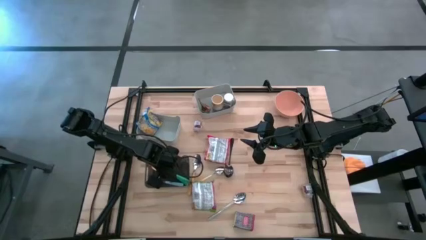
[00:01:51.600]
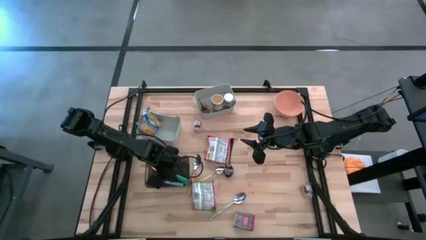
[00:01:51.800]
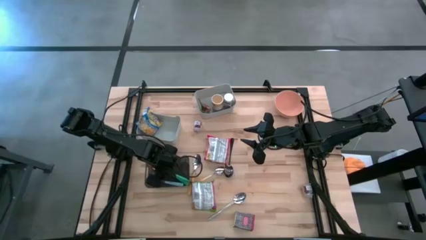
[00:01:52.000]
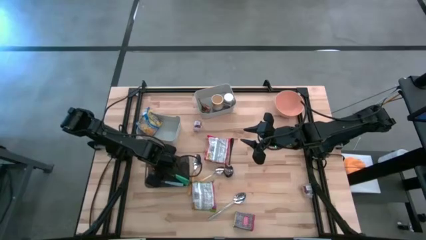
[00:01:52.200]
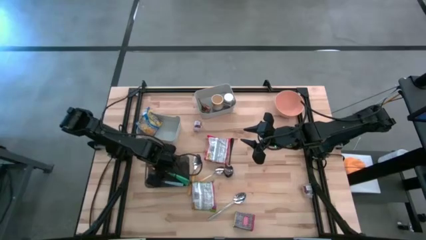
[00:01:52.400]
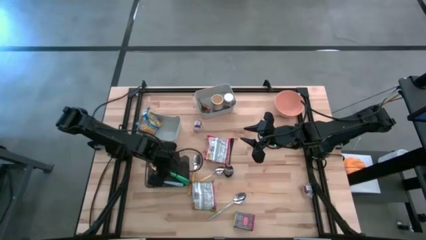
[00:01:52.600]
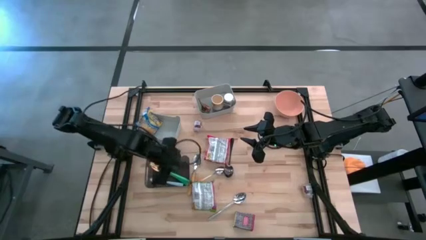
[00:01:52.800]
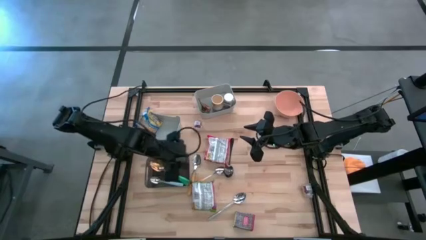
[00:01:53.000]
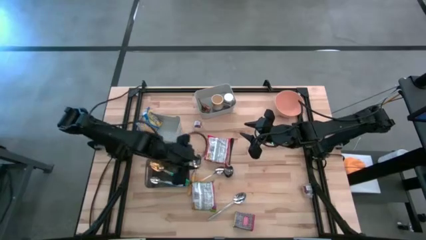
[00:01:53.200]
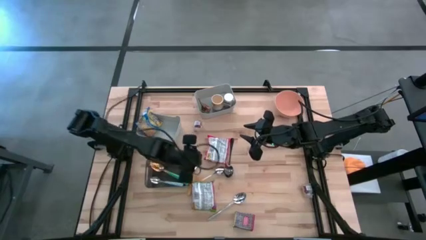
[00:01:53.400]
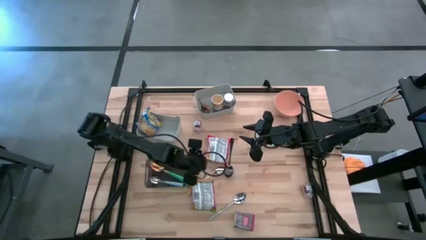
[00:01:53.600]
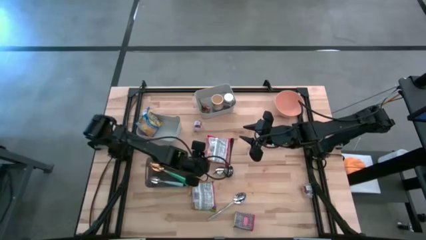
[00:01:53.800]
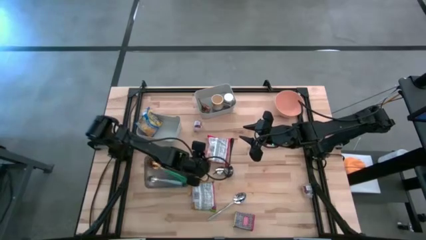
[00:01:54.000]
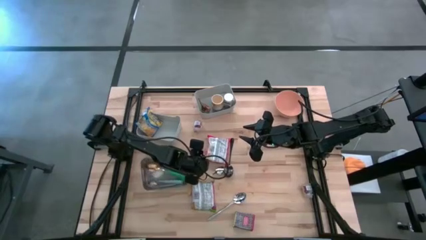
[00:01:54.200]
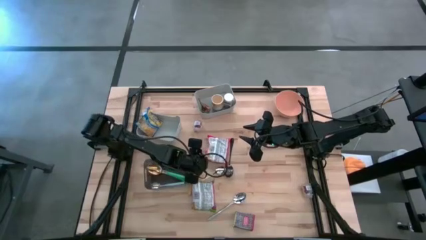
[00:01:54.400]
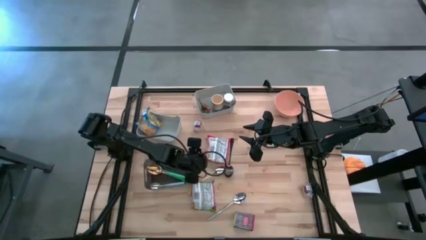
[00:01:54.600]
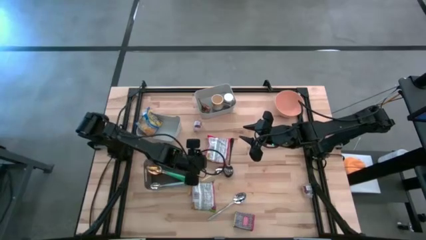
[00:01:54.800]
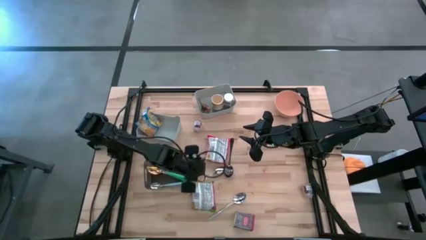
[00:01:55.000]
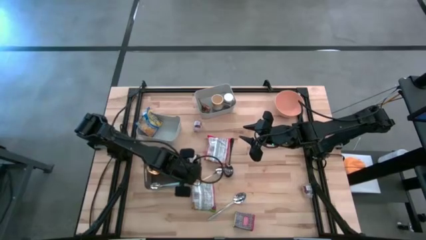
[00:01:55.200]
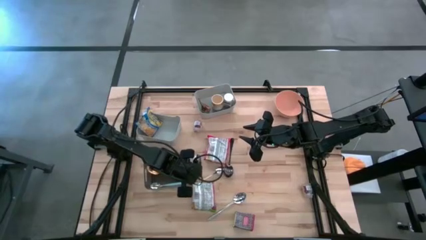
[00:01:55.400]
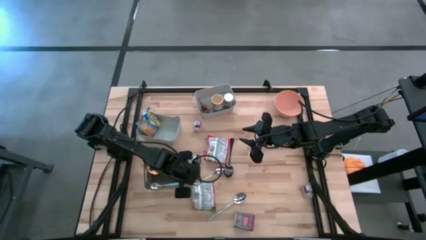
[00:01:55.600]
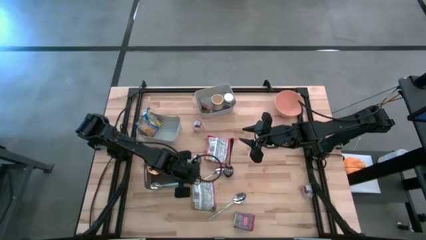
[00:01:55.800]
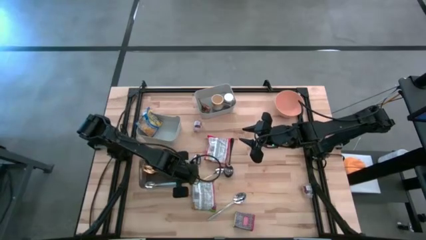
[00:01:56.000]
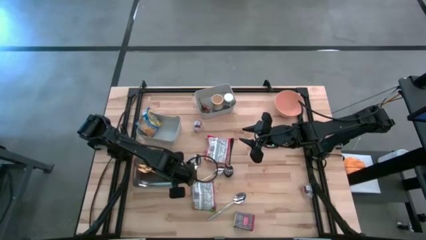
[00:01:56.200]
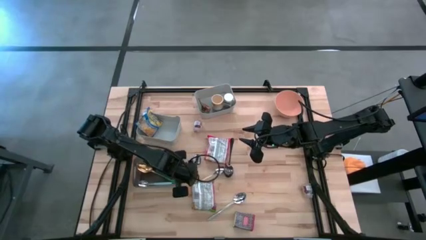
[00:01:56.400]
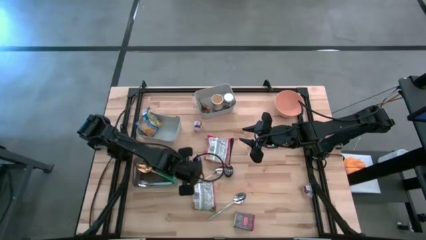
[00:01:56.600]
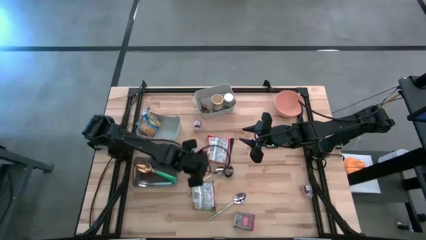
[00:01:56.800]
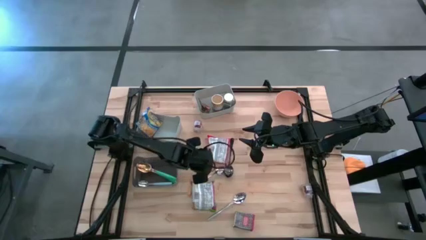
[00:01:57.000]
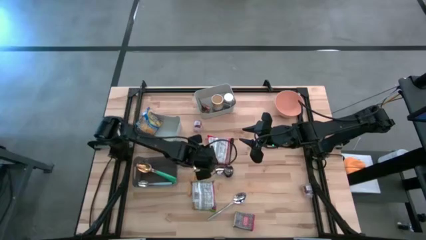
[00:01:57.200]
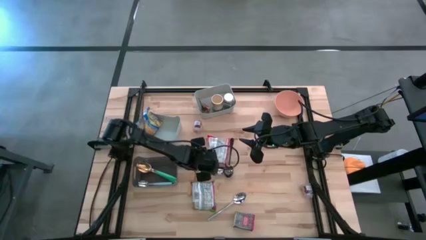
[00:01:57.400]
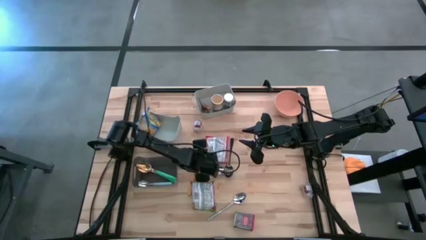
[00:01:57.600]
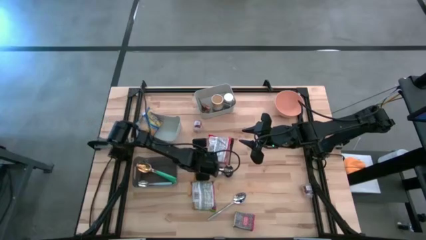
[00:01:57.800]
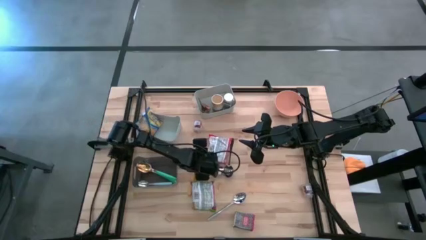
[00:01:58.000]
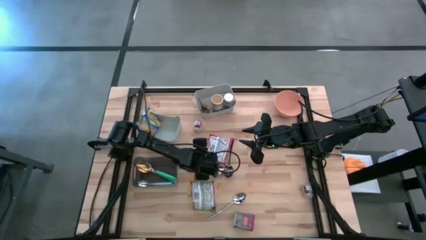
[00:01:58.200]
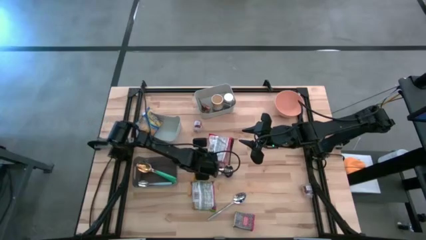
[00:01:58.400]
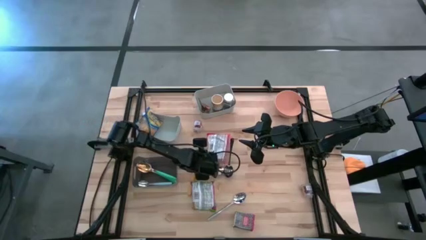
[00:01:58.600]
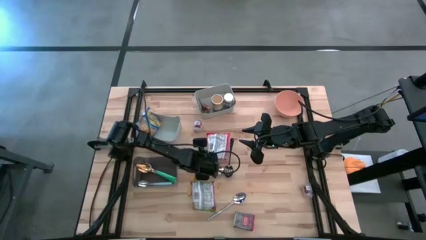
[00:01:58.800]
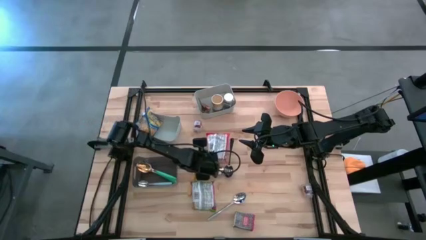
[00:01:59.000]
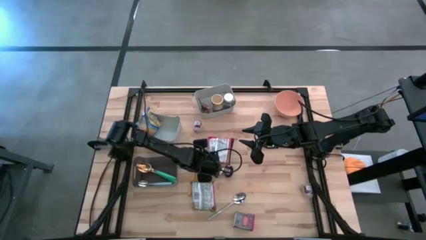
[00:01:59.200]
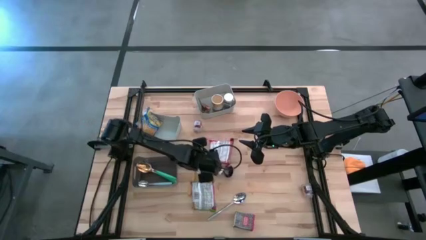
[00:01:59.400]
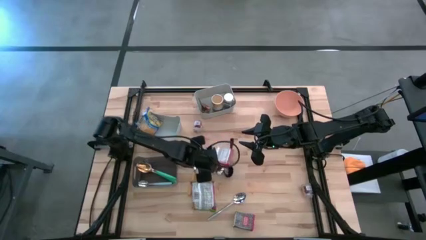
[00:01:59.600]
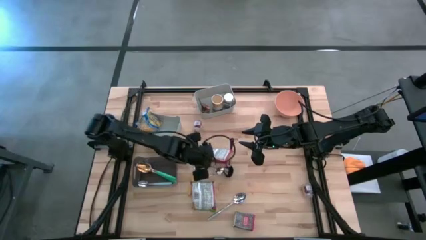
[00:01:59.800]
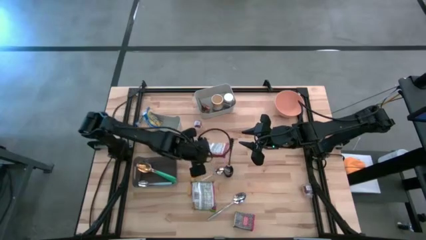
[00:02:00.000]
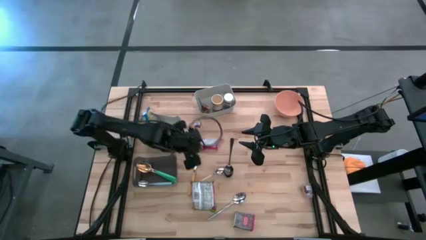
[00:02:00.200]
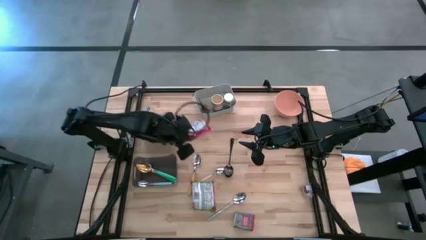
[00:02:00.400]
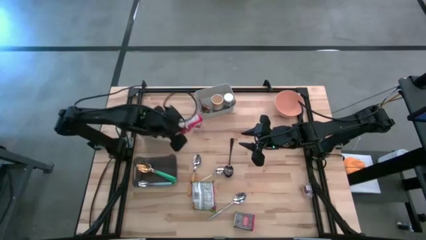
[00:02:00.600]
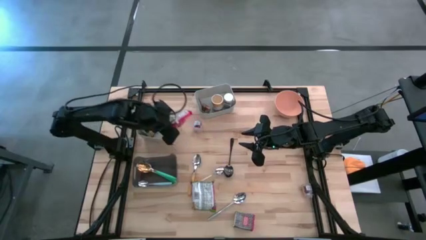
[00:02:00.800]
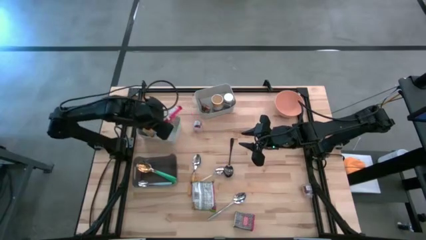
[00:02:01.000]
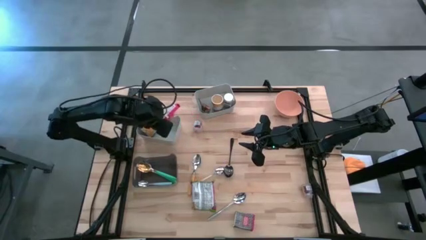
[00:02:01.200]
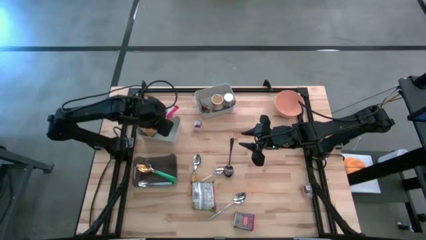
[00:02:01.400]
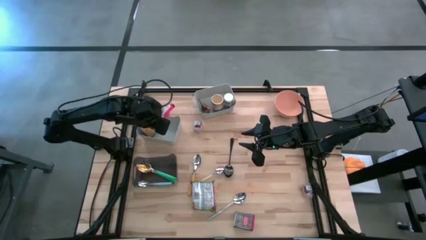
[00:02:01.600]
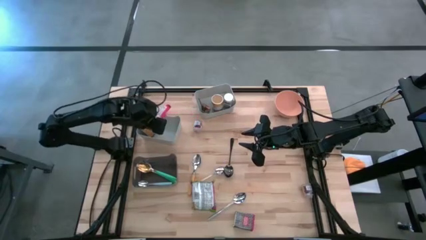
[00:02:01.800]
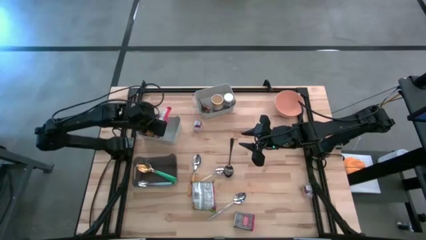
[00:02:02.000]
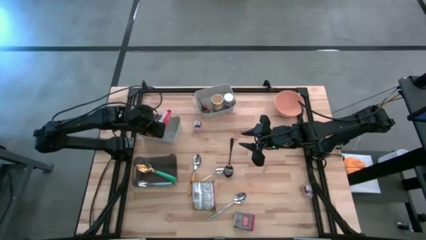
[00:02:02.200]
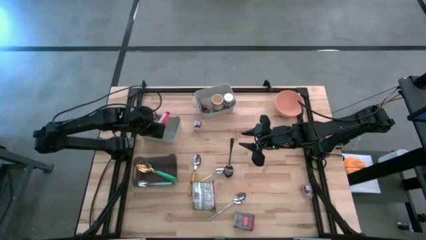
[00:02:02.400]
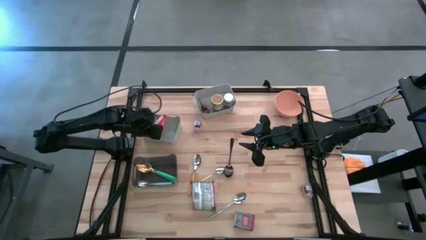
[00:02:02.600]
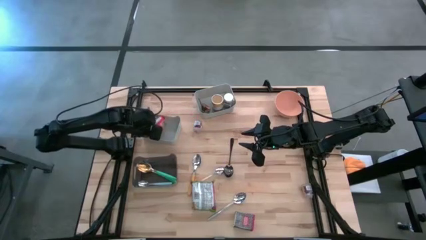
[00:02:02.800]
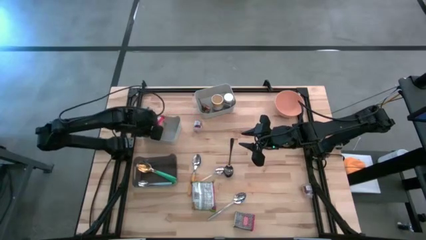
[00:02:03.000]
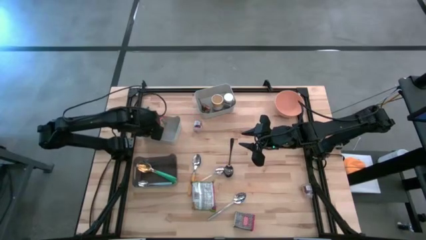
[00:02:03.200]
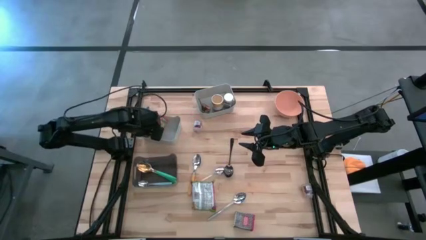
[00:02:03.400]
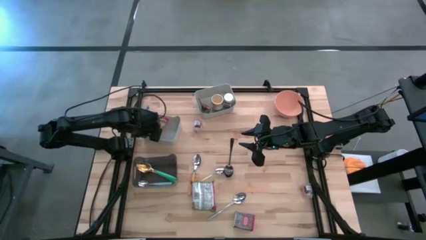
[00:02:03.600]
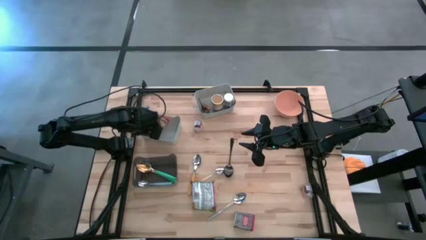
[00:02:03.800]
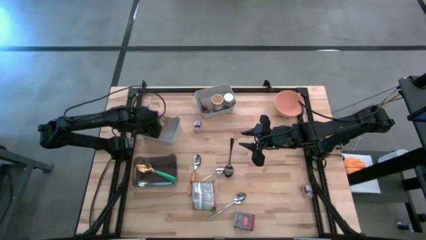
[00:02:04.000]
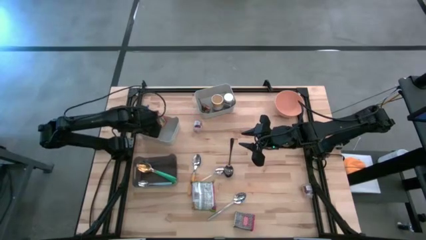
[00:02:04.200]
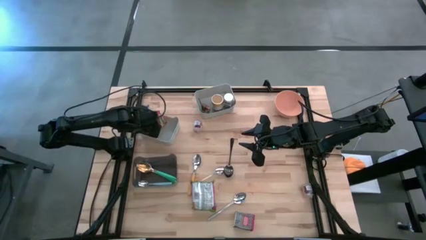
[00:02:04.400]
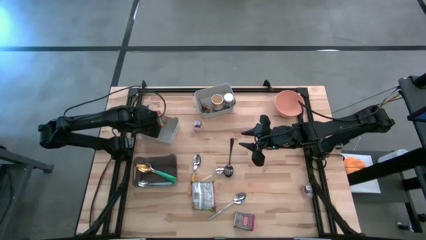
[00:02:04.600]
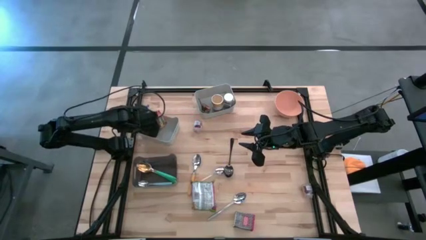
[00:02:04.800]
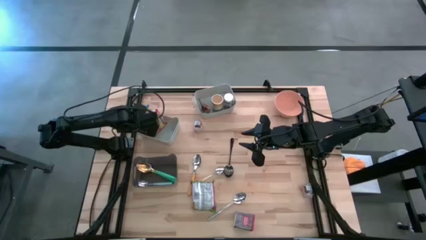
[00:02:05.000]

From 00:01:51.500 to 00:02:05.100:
Put the red noodle pack into the bottom gray bin
